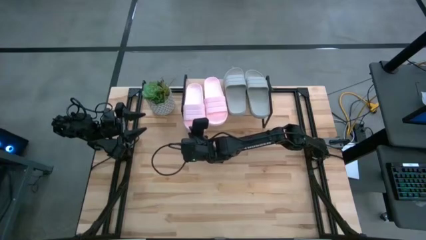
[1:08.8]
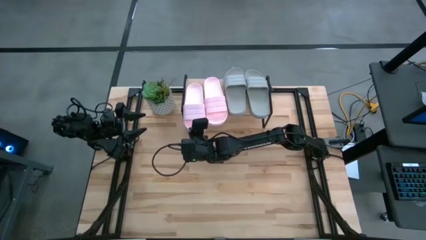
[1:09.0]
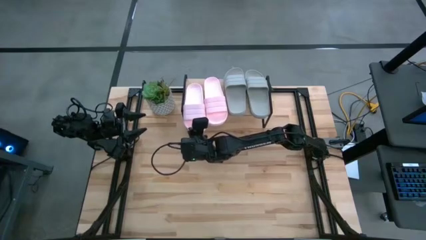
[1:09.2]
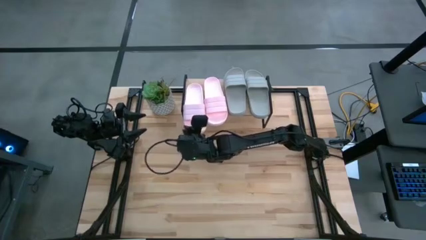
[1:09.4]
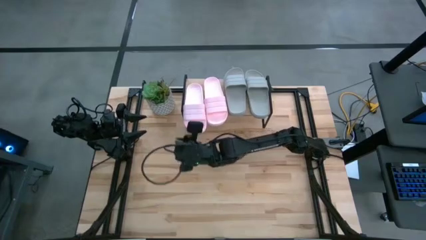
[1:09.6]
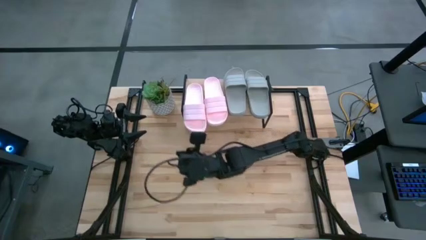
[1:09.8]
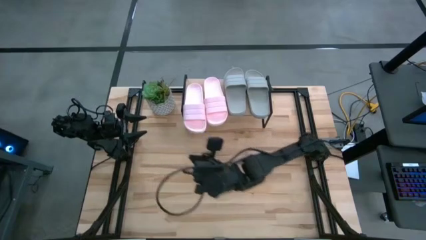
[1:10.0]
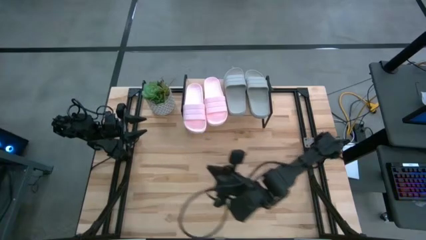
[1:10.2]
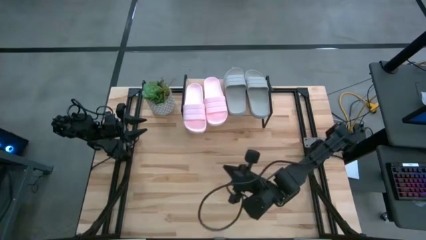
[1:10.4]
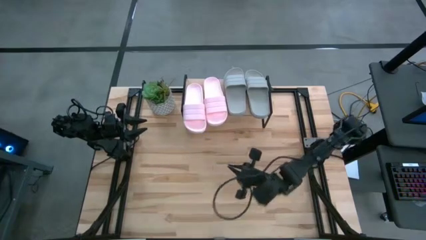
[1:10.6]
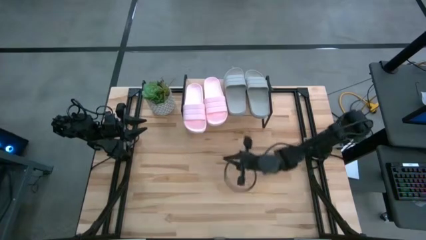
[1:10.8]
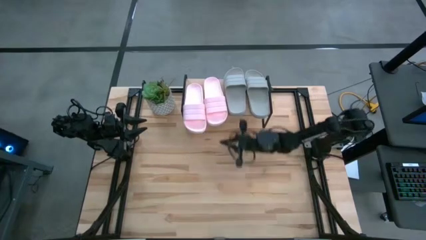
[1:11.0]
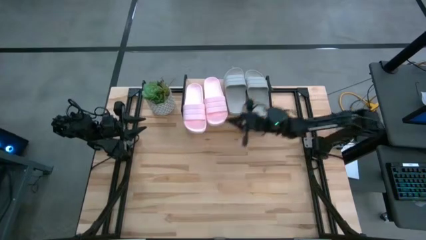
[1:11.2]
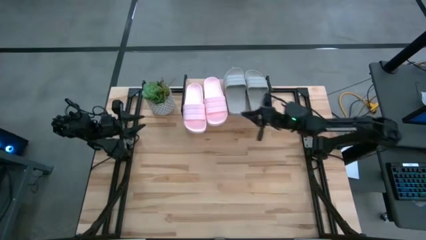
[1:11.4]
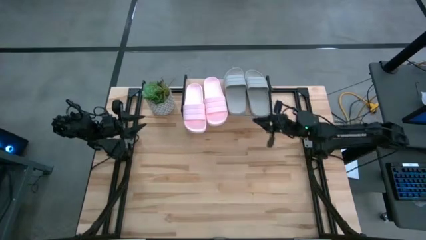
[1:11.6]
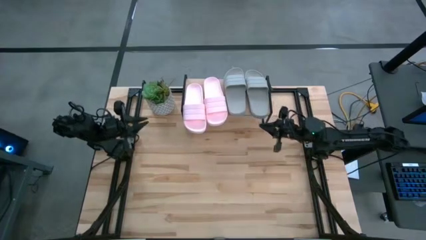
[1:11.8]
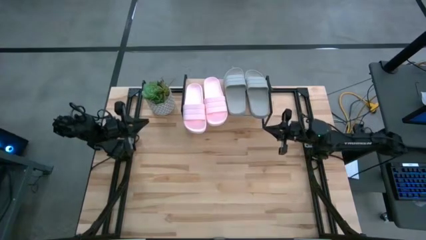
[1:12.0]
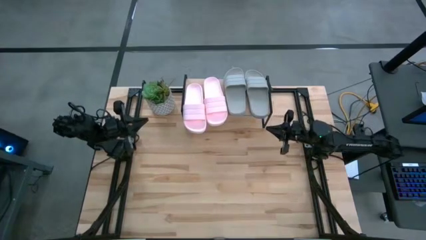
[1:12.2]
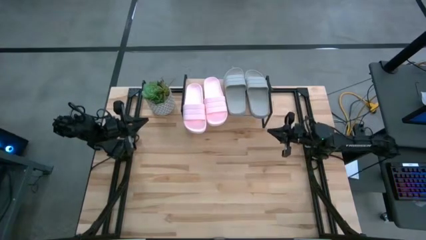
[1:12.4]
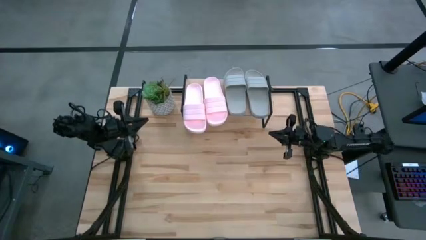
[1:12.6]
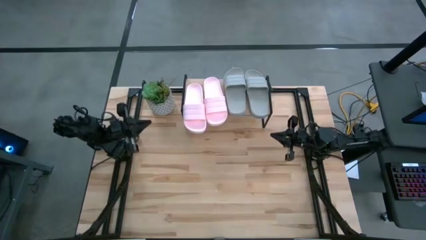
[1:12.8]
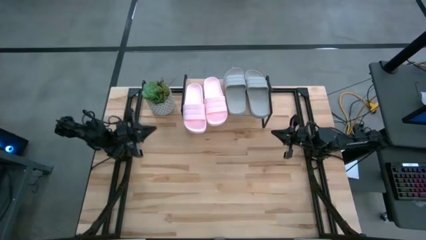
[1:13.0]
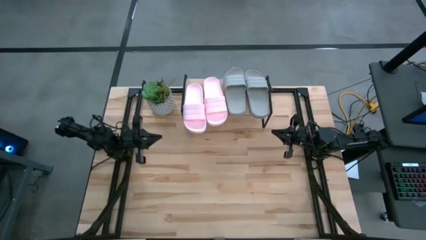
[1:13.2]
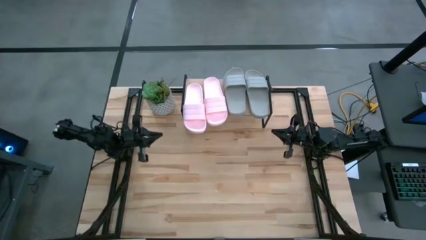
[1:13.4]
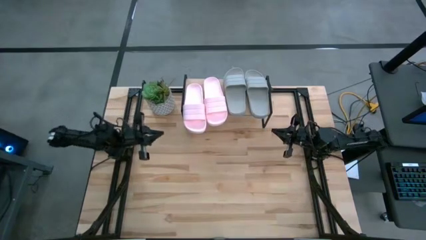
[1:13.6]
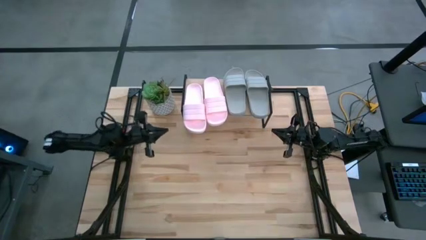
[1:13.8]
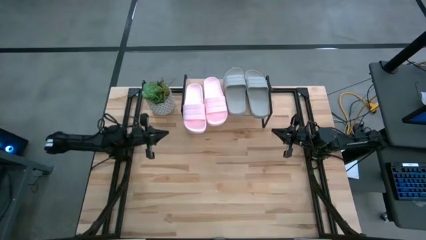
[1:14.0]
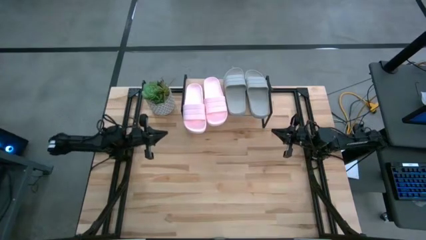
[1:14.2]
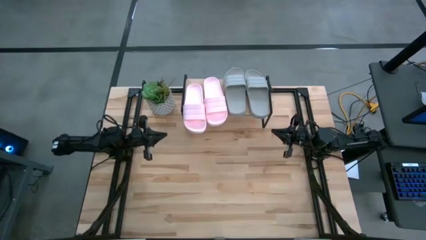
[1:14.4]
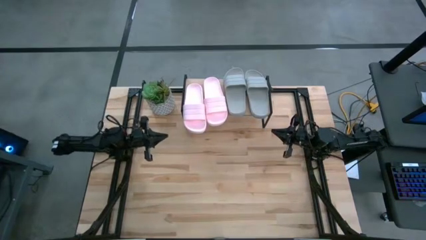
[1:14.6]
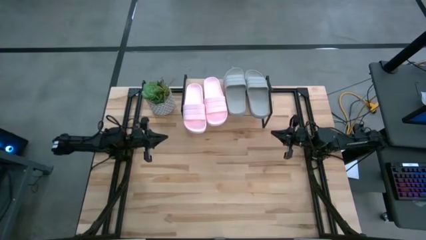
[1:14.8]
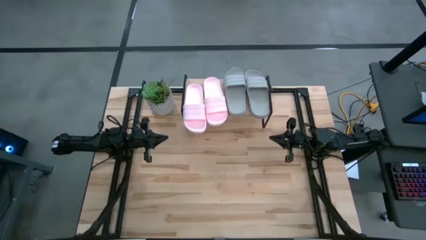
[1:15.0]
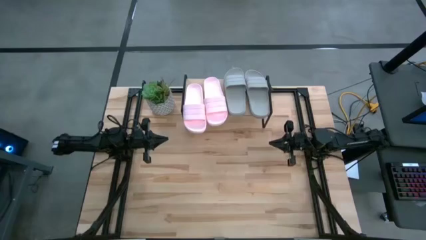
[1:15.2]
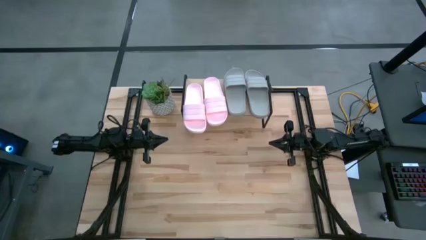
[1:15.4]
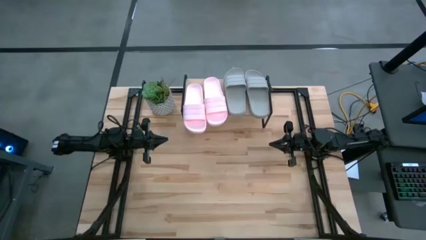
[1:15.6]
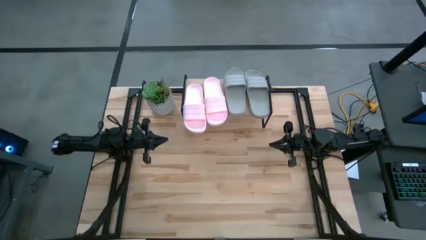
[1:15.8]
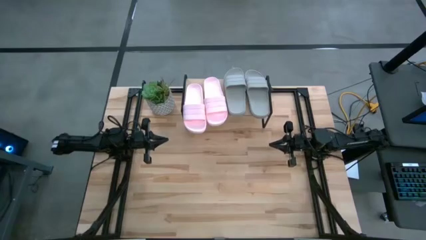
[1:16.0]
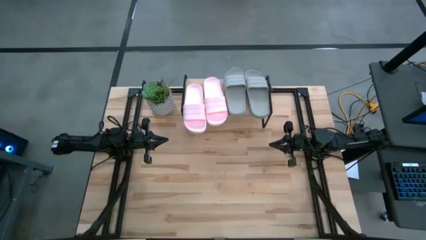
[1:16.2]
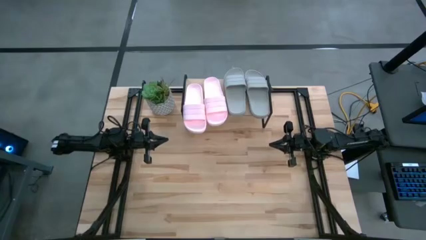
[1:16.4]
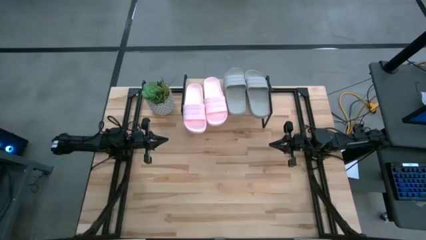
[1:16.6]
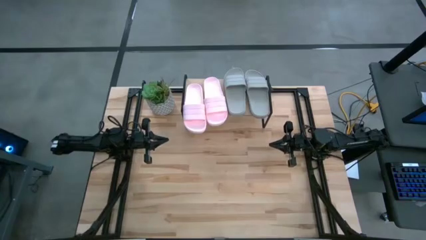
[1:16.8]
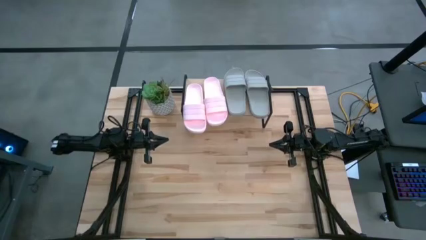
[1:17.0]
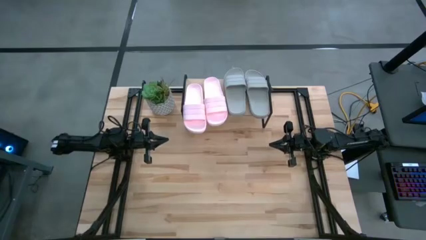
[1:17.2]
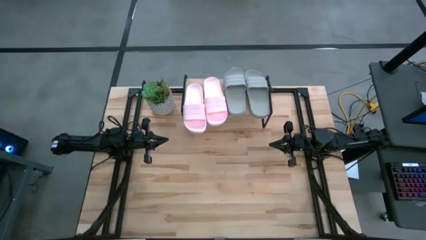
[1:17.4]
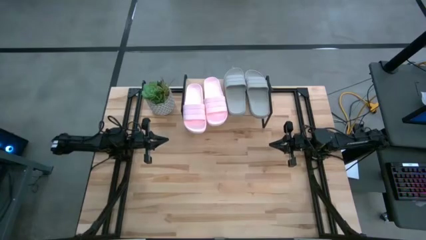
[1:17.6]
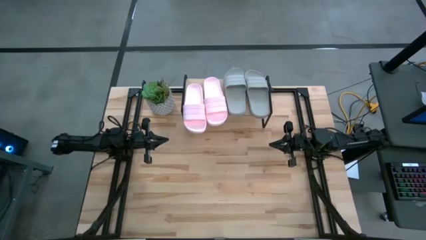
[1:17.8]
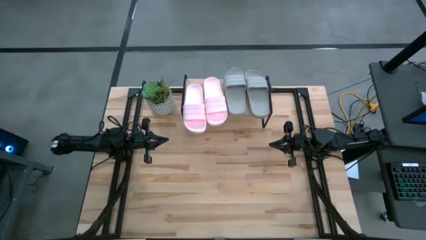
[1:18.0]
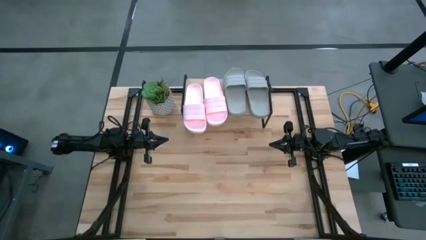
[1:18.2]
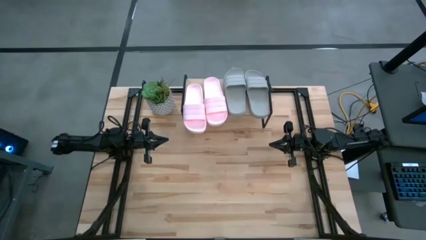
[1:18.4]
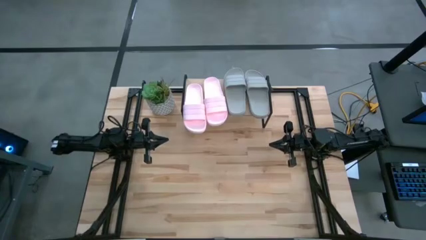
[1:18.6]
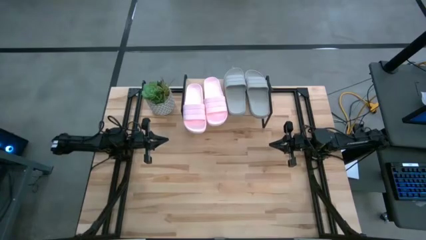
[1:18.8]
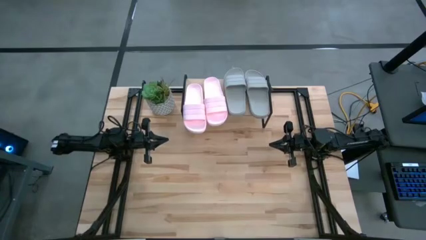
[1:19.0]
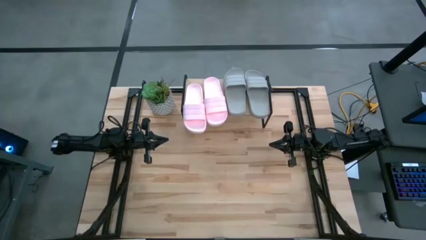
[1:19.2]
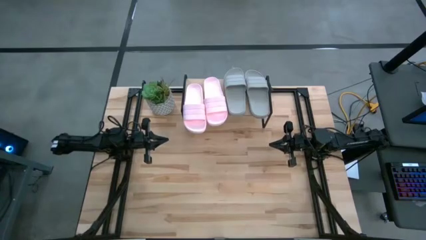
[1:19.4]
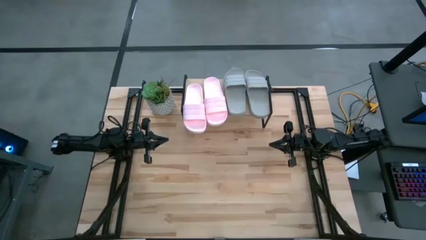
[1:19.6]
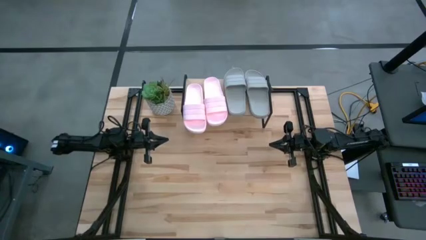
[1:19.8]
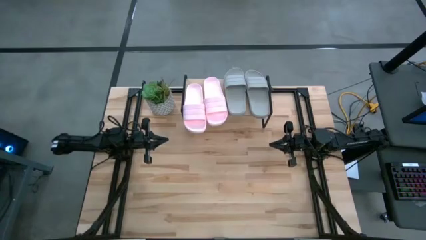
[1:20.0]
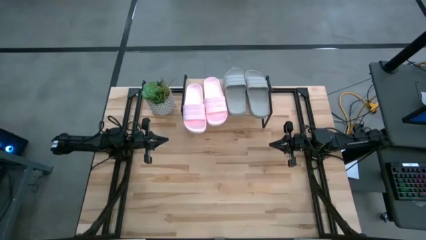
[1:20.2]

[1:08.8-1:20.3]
Task: Pick and place slides into the shelf
Return to Home Position
